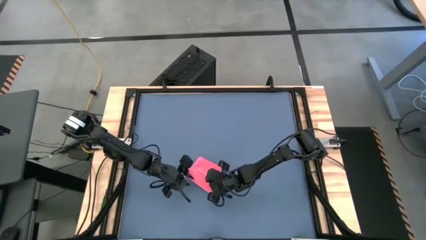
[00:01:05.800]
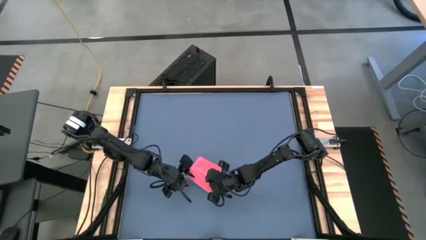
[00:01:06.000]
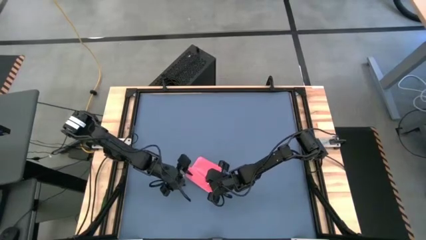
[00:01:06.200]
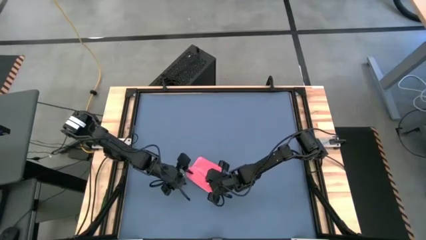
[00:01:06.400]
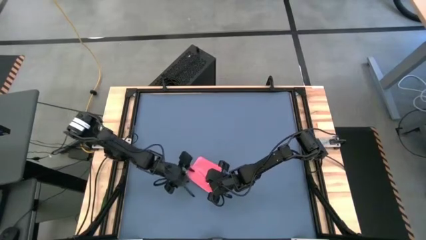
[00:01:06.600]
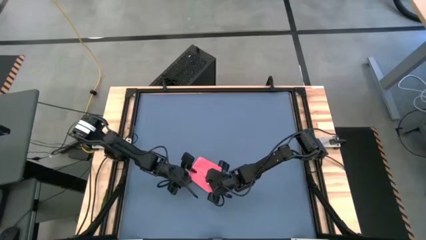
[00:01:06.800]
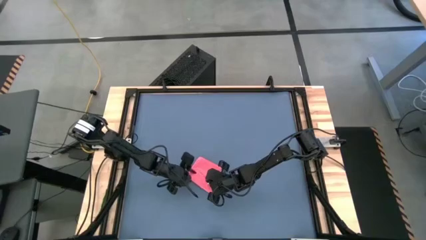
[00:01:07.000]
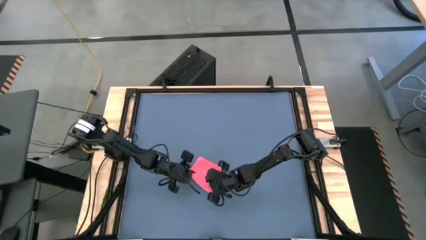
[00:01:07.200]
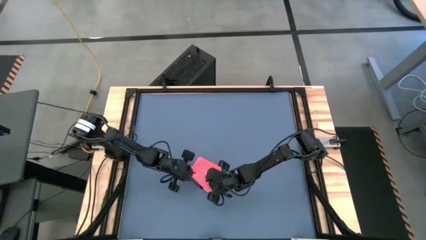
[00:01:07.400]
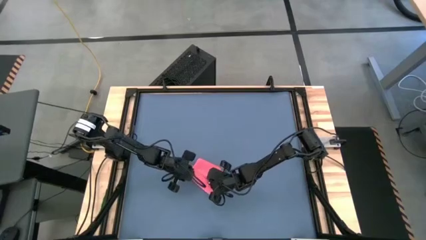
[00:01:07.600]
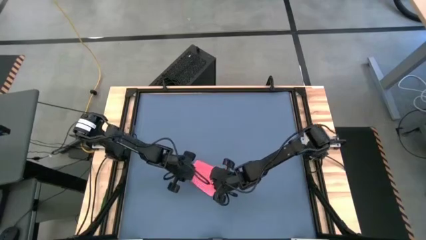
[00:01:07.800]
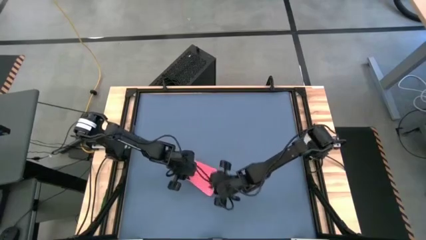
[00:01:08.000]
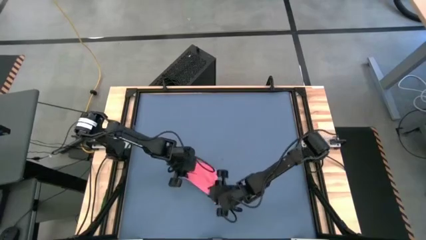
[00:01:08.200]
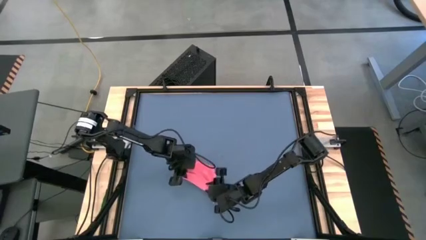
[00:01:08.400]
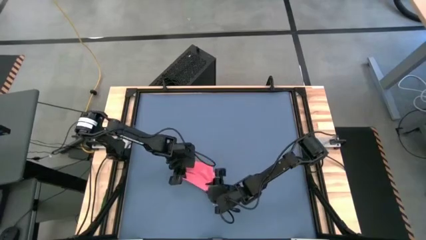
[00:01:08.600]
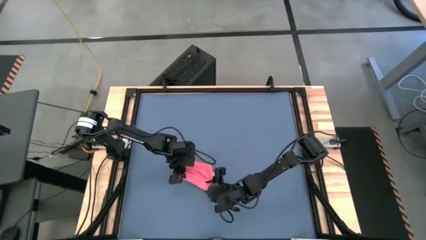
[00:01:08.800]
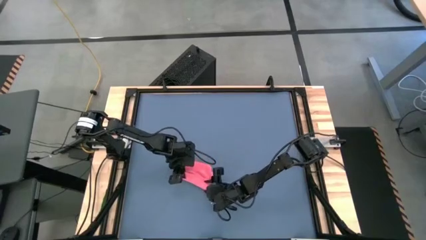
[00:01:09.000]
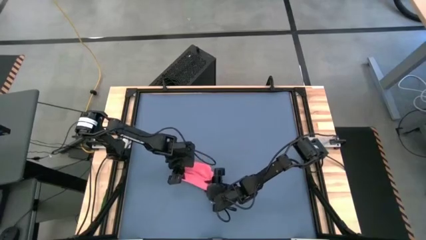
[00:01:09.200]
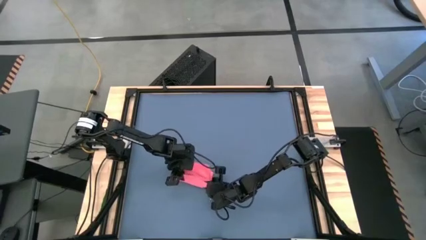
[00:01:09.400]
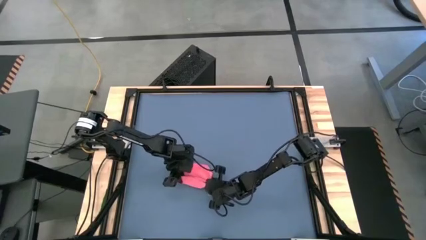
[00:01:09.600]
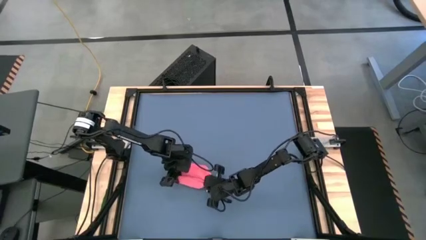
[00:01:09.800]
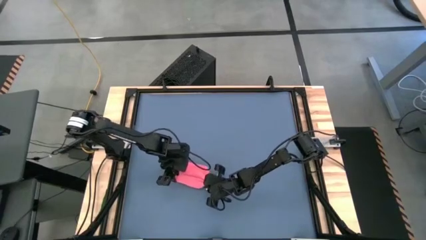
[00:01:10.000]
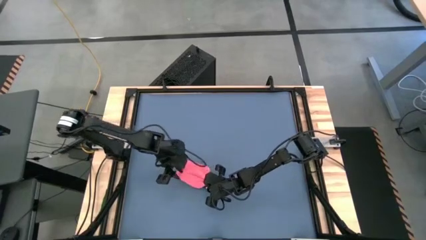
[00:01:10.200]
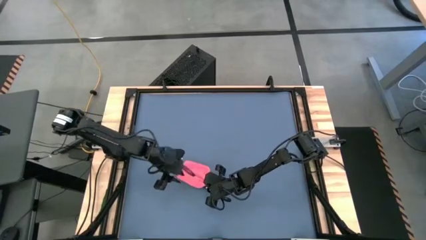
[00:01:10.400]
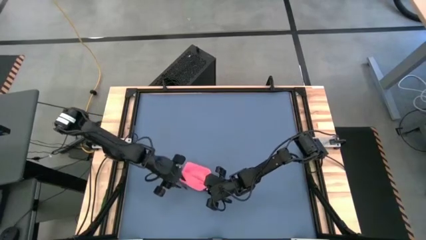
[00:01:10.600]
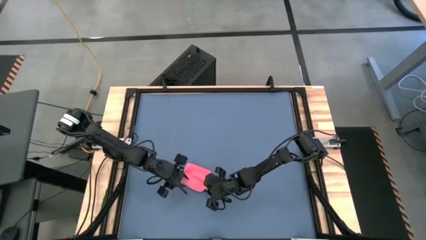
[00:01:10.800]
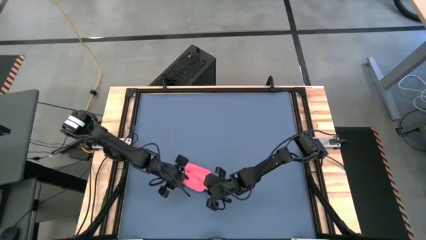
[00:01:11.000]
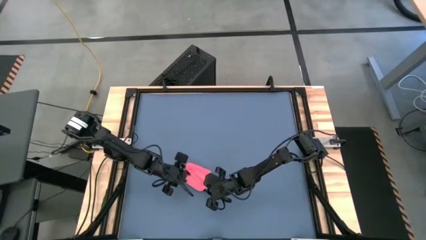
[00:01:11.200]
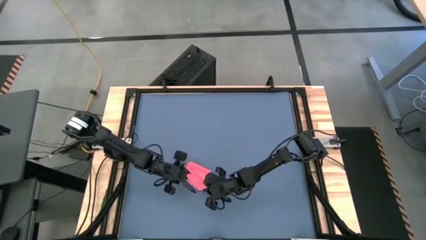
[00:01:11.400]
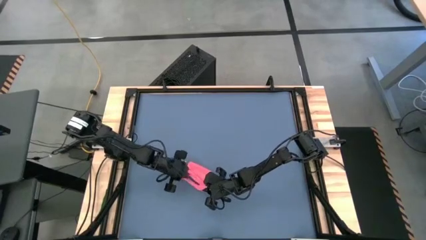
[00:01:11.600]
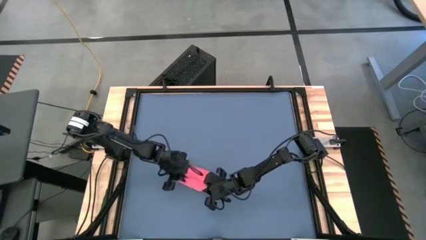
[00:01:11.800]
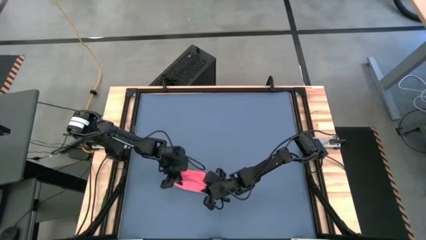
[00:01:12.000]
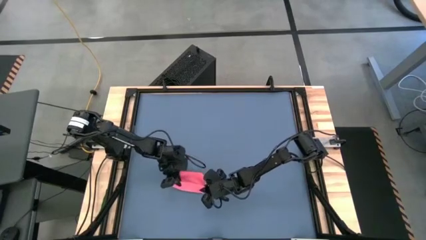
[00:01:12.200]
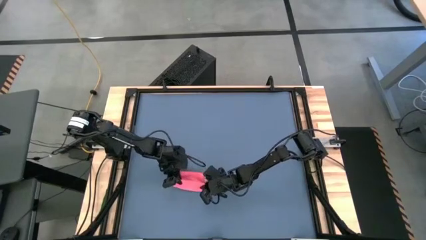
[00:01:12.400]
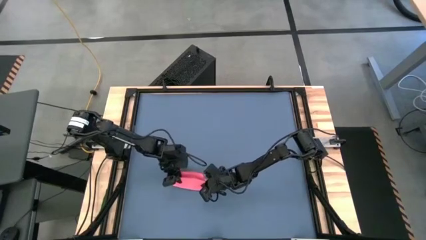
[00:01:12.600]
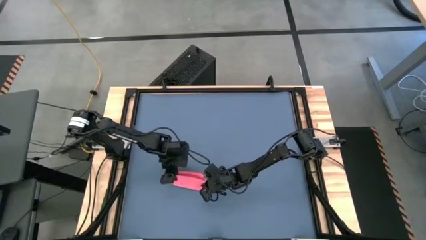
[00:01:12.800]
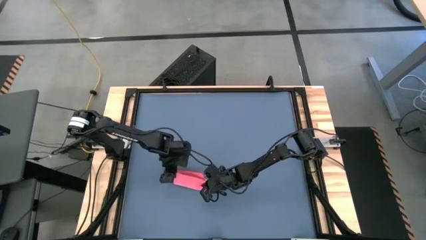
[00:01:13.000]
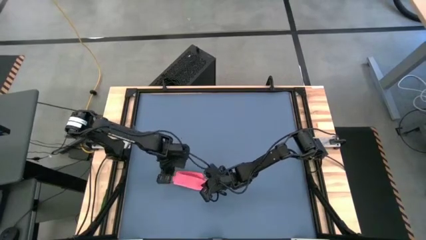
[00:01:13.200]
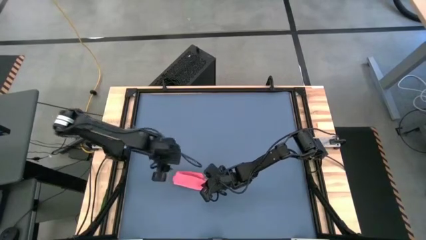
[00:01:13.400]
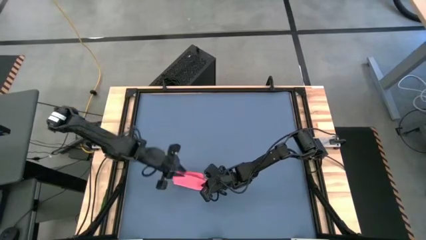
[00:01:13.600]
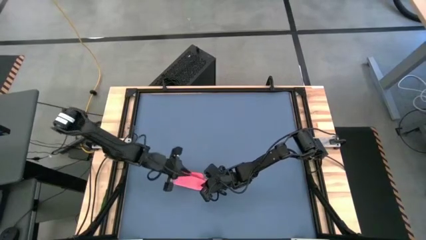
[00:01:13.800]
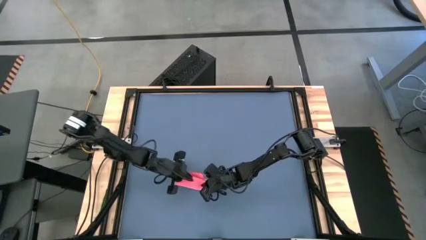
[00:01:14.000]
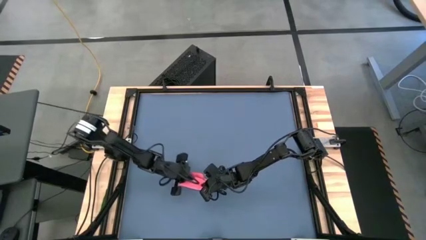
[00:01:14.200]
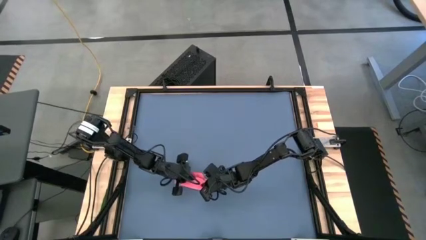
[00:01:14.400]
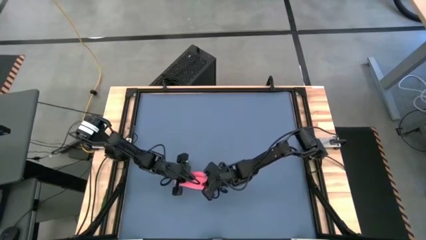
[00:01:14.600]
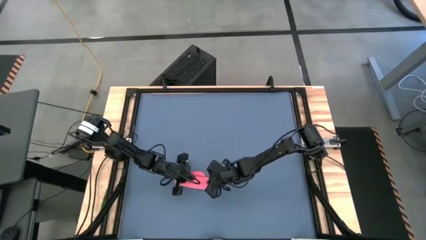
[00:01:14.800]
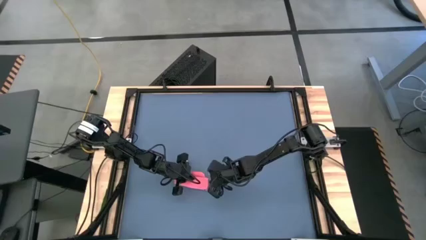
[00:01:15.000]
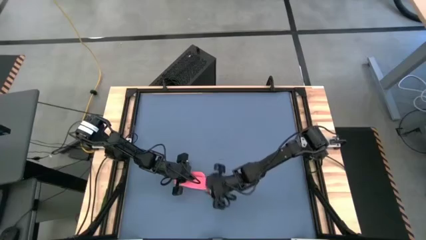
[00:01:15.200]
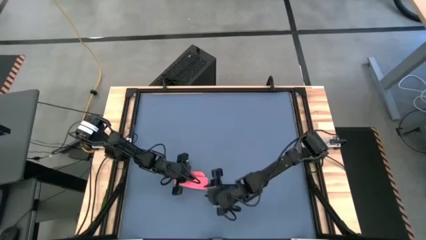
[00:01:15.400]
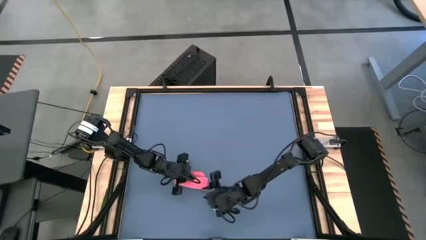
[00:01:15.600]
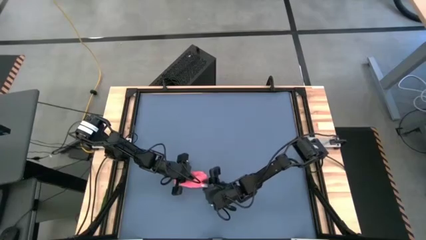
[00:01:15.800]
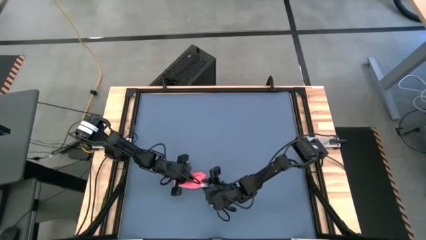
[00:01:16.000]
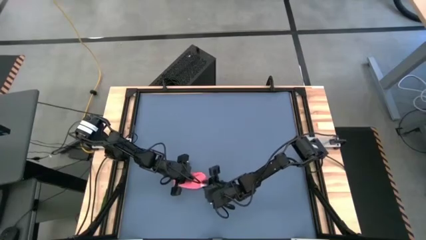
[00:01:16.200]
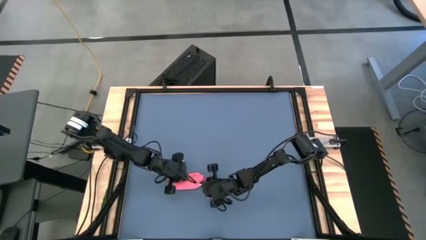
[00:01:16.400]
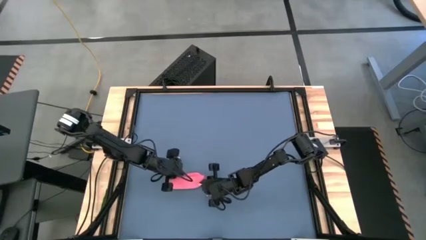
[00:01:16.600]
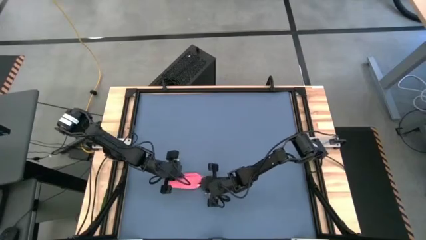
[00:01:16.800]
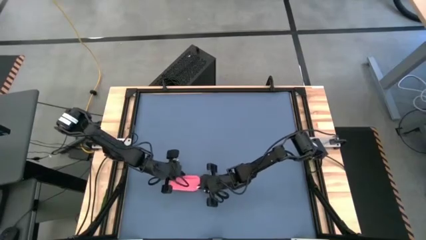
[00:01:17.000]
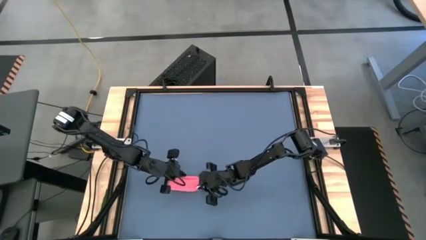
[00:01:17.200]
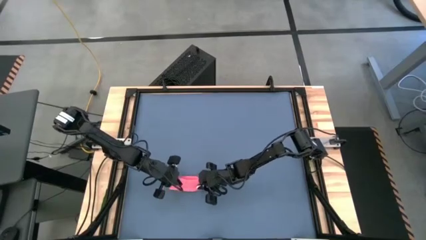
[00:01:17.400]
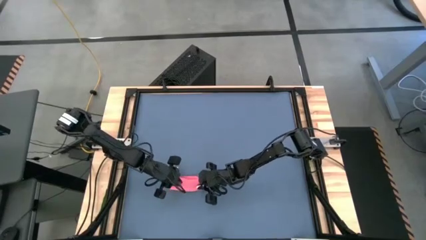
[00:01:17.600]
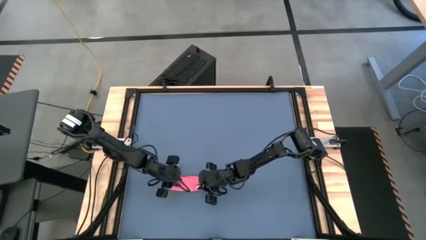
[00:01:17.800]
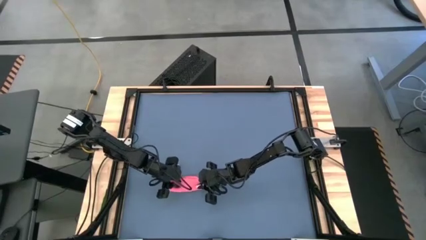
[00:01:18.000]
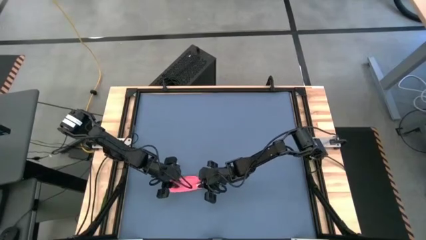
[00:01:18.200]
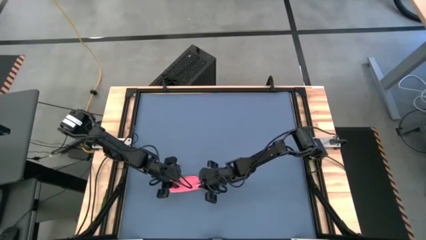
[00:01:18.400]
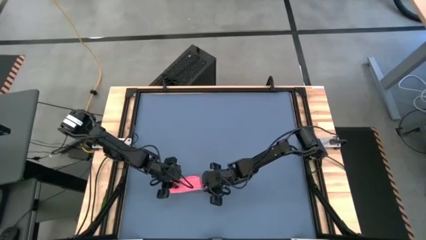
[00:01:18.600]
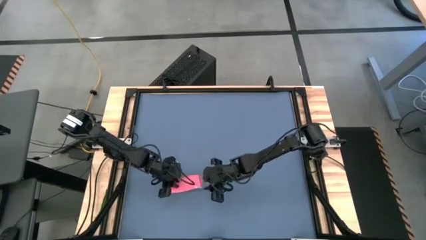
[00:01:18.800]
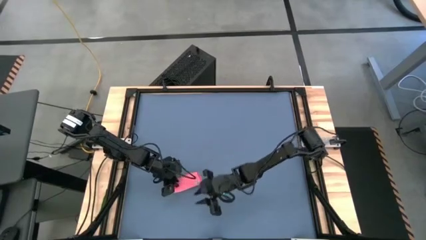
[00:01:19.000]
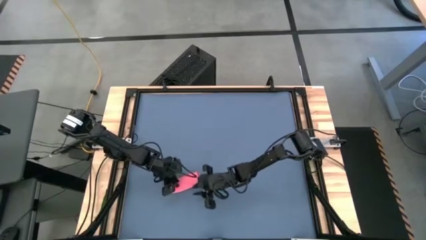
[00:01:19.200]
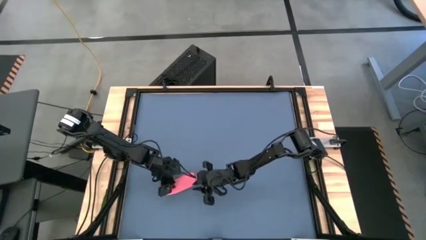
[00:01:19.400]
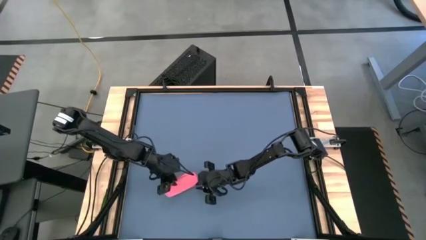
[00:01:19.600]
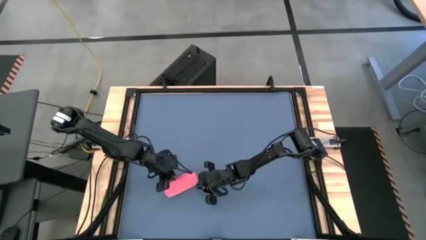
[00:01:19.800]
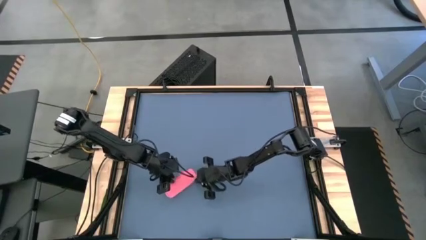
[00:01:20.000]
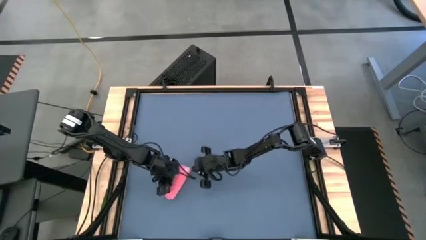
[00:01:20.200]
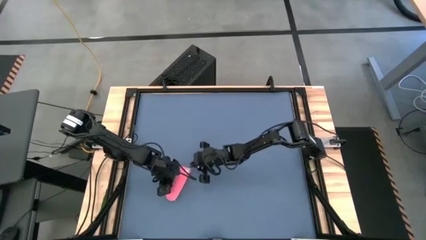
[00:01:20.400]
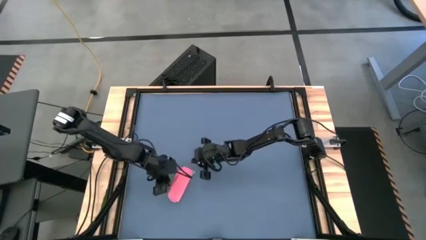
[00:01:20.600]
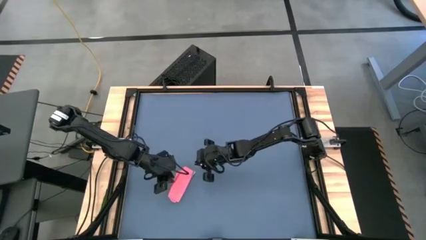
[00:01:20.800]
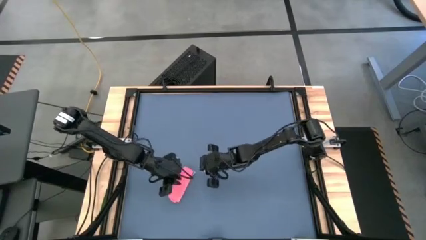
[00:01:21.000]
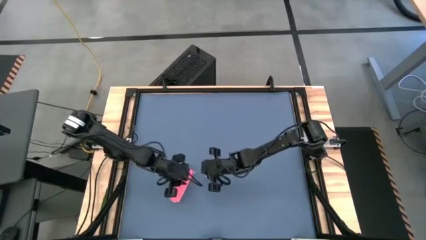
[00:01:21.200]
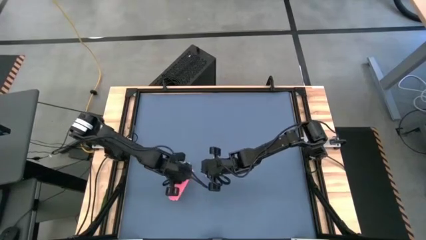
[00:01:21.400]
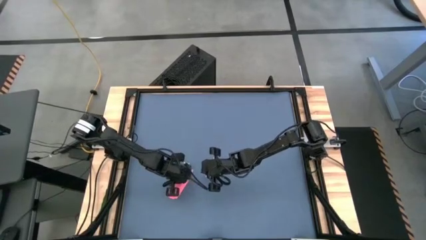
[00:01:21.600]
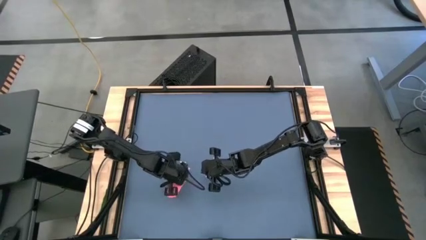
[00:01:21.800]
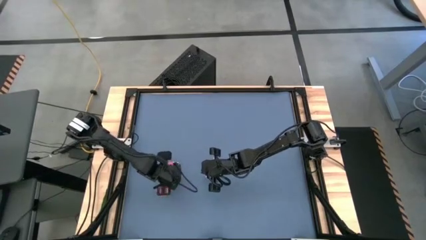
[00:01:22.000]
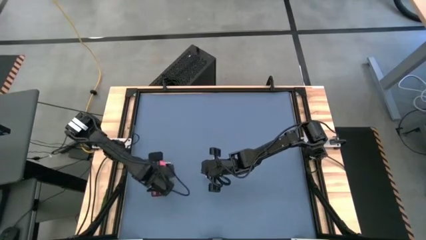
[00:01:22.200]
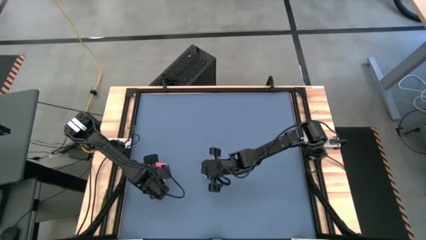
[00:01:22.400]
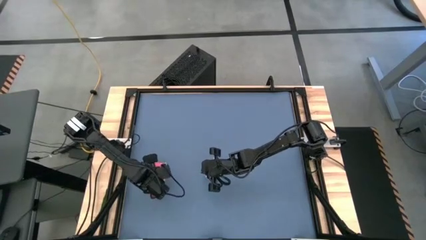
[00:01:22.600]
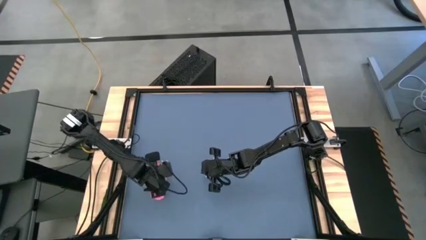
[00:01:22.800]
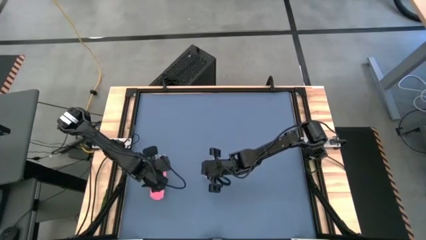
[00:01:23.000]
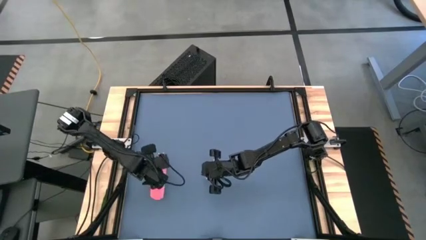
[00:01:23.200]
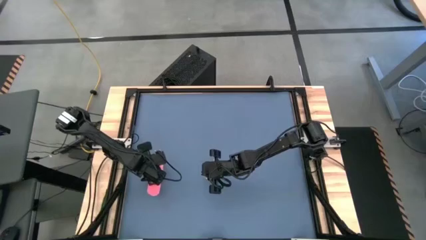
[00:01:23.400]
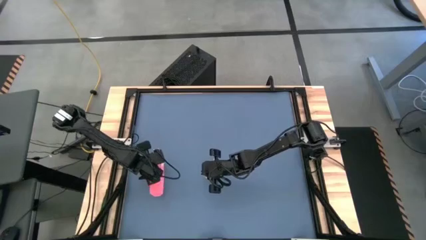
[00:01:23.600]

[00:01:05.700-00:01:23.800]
Task: Roll towel into tight, uniform cylinder
Roll the red towel
